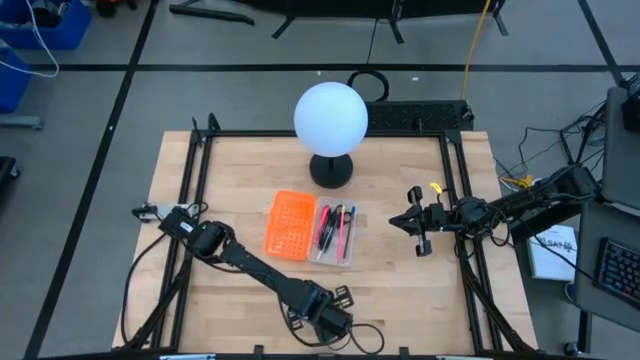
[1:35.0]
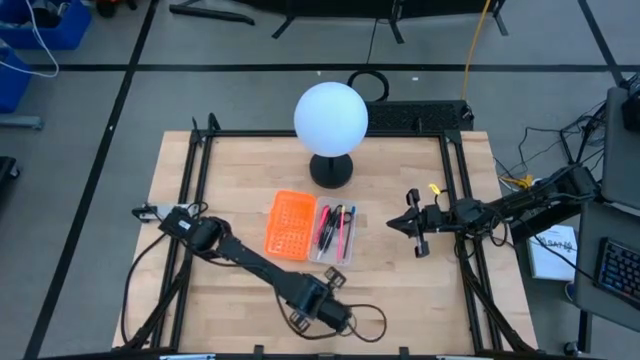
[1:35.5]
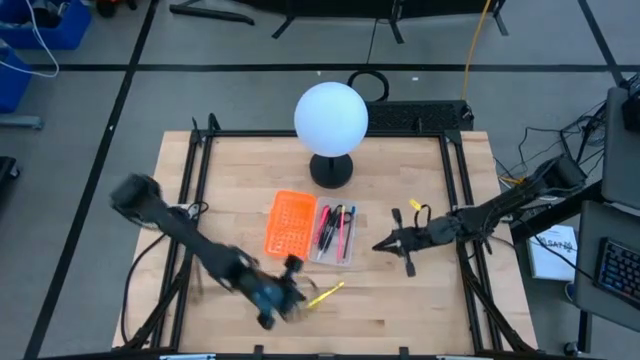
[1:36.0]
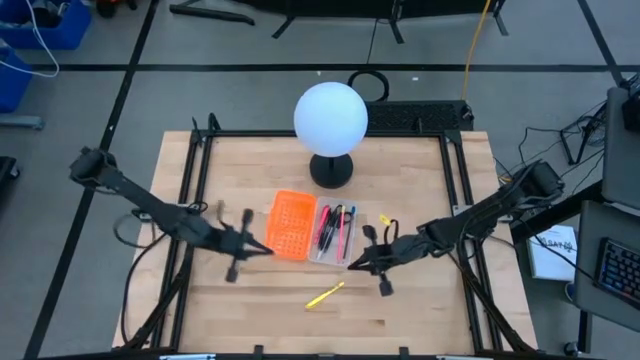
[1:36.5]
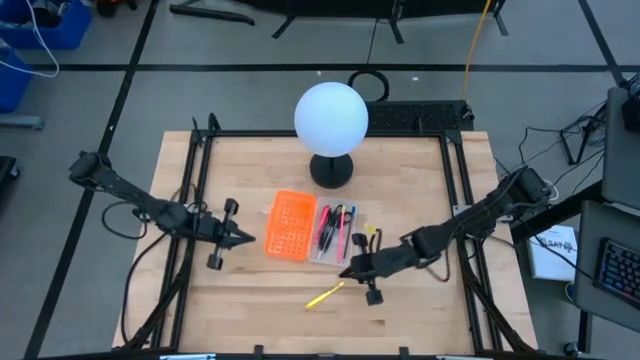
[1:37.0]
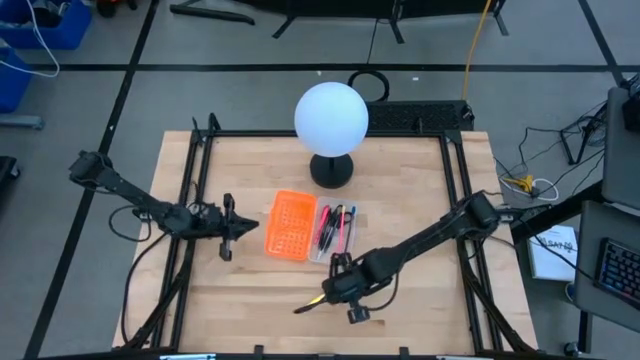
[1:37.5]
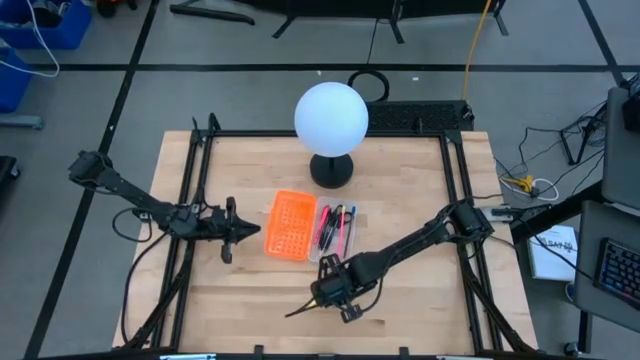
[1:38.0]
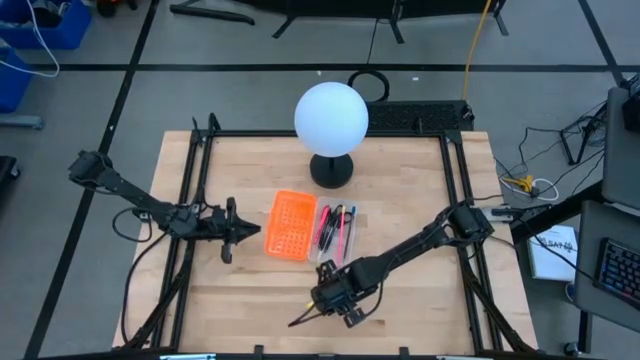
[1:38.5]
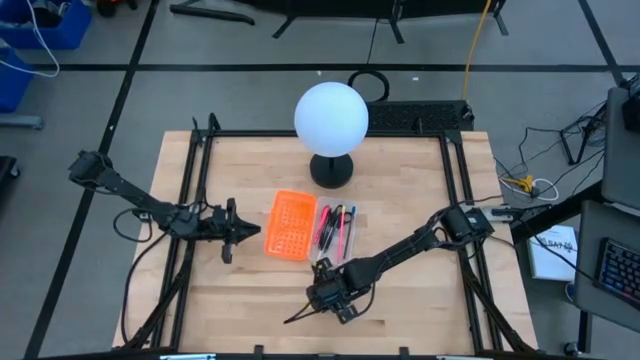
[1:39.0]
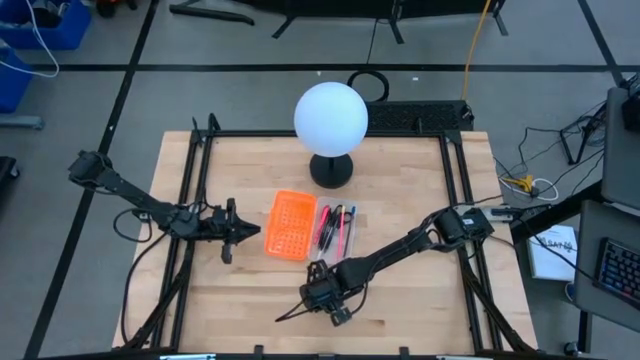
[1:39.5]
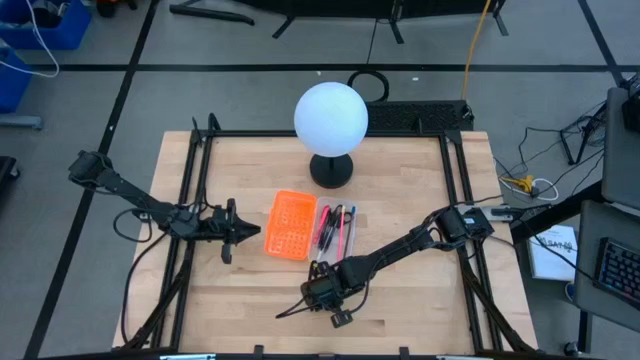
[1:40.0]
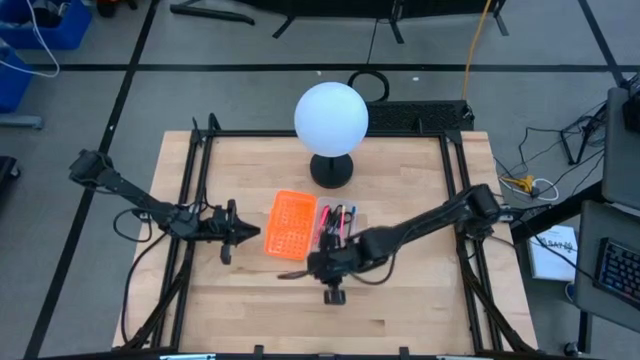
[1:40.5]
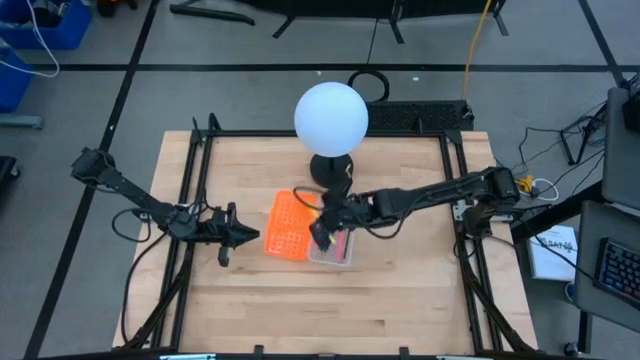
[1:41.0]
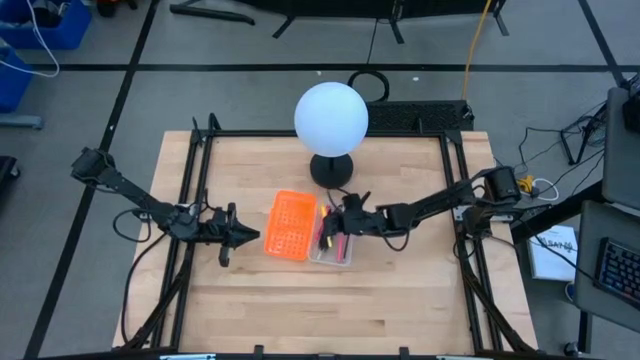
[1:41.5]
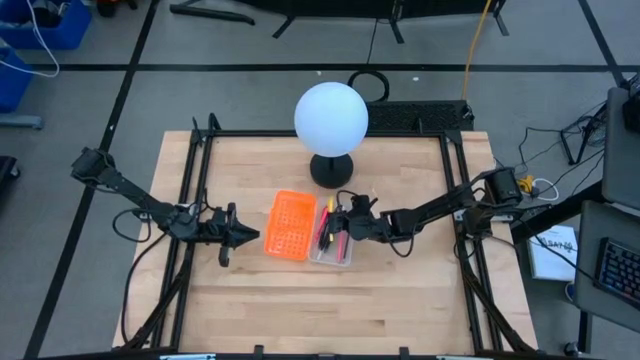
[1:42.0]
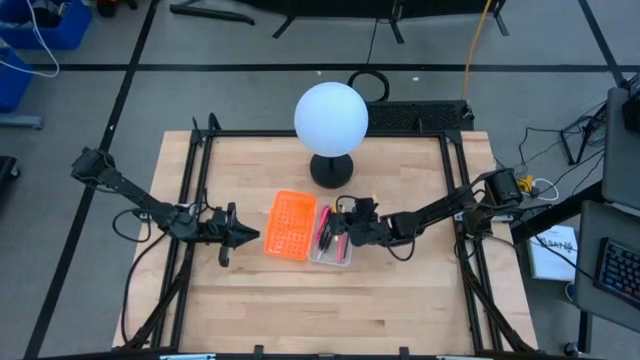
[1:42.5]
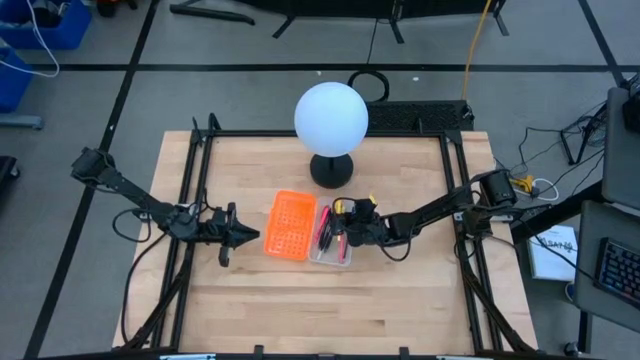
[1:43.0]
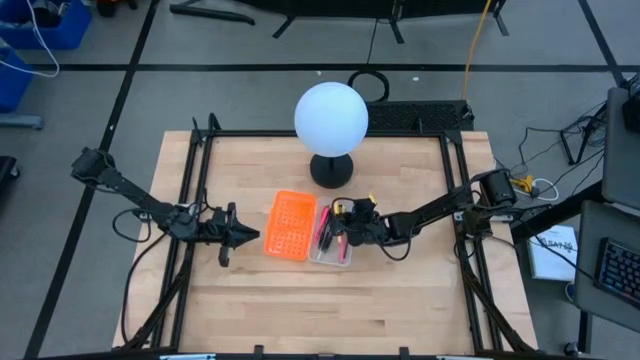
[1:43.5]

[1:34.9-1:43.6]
Task: Pick & place school supplies into a supply box
Put the yellow pen into the supply box

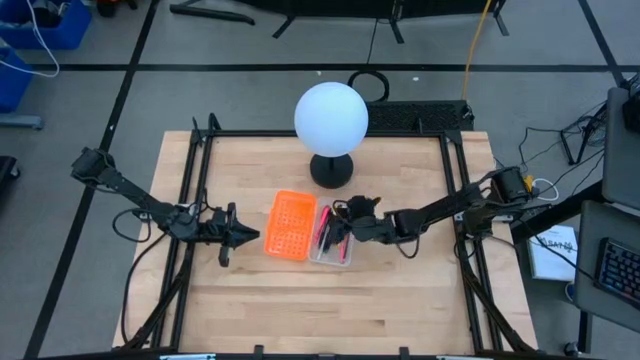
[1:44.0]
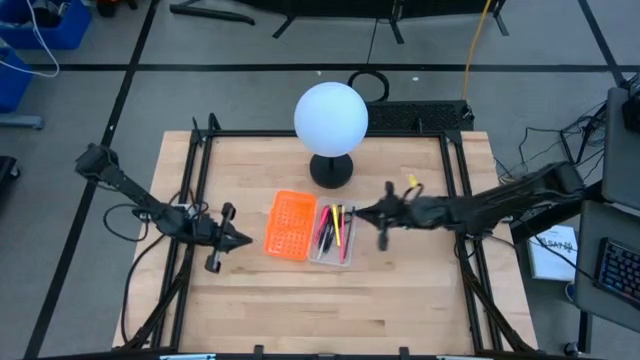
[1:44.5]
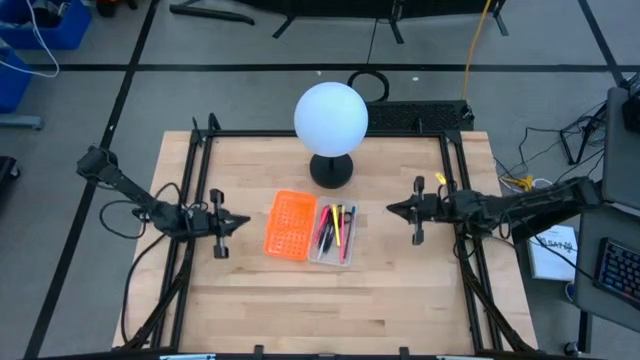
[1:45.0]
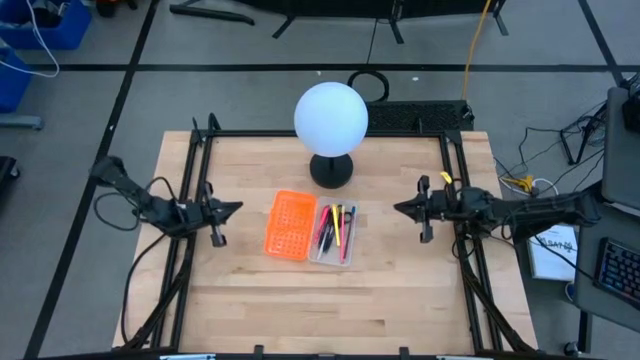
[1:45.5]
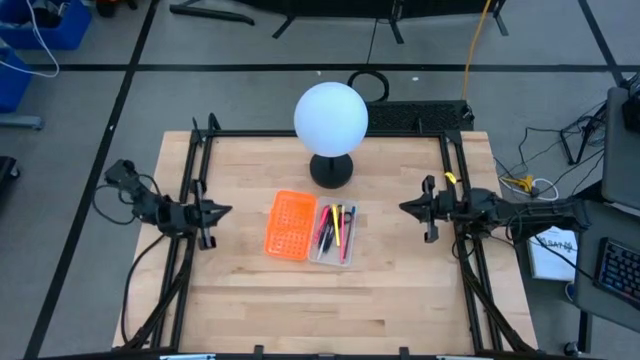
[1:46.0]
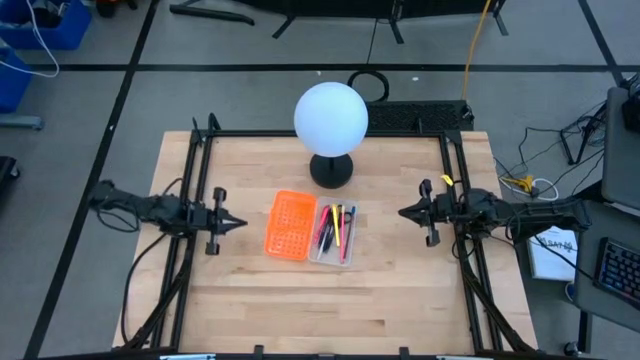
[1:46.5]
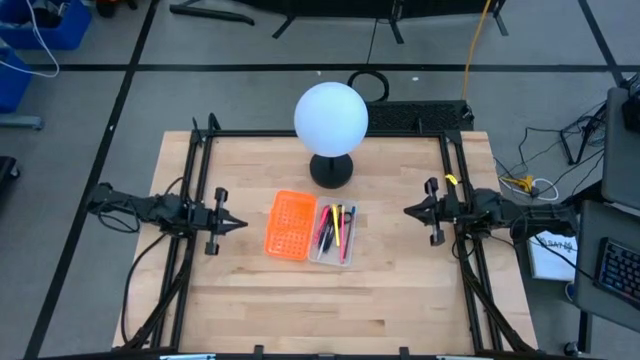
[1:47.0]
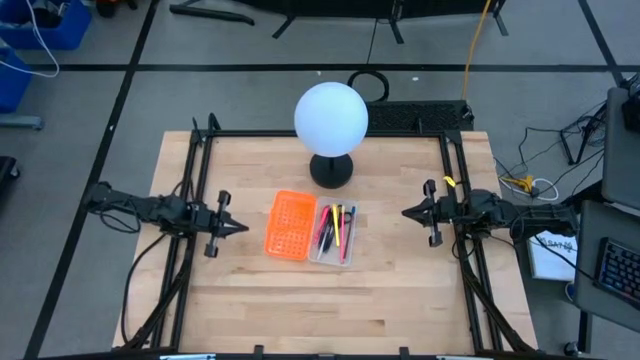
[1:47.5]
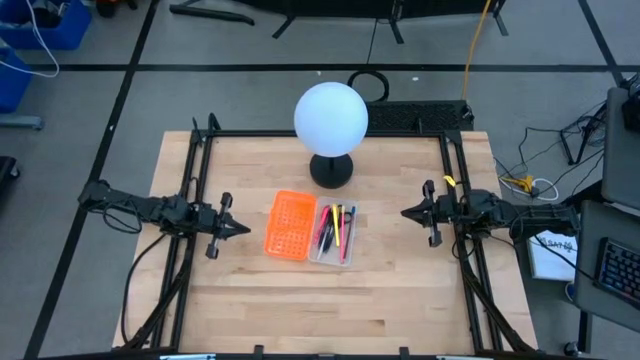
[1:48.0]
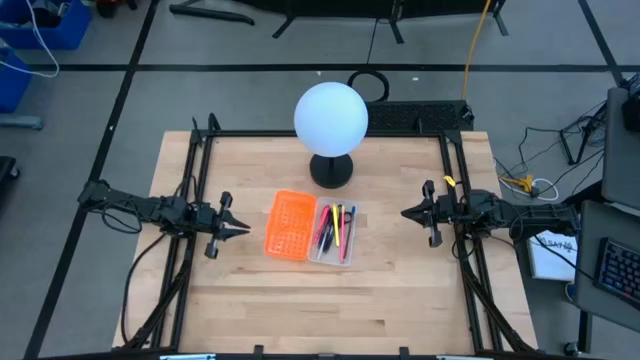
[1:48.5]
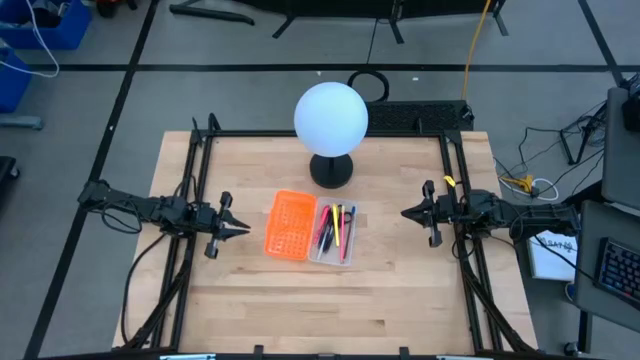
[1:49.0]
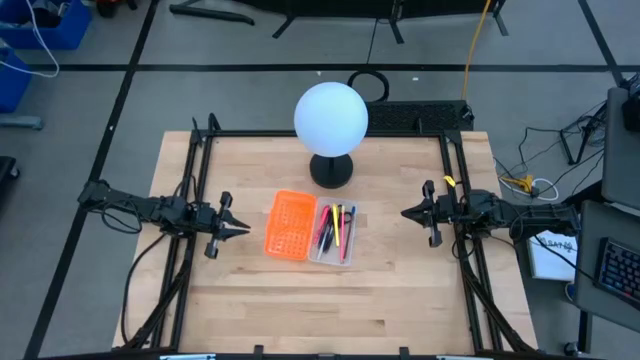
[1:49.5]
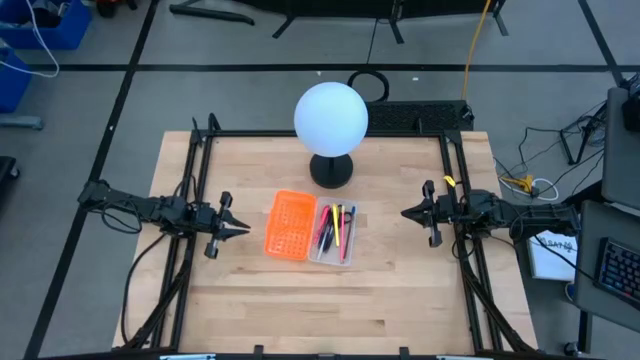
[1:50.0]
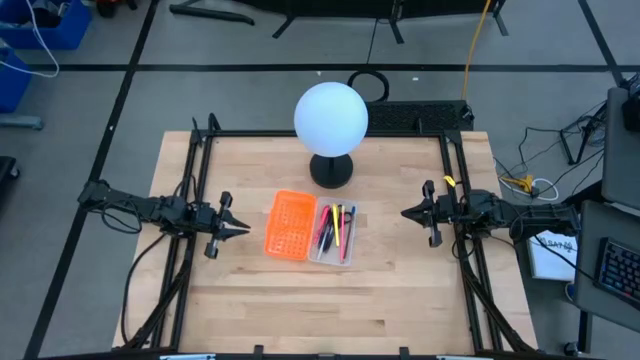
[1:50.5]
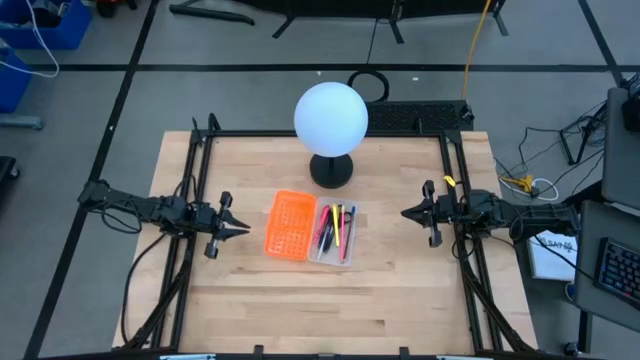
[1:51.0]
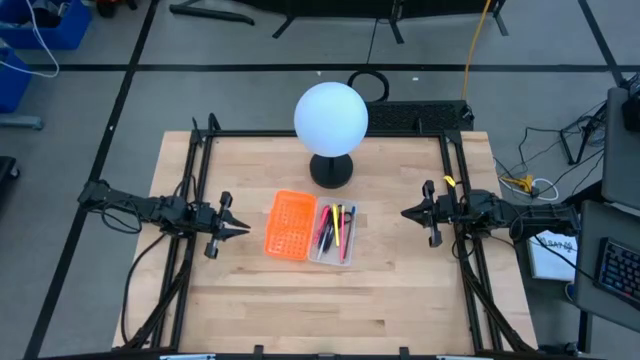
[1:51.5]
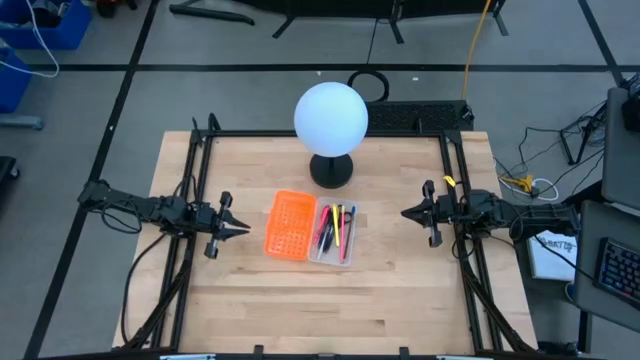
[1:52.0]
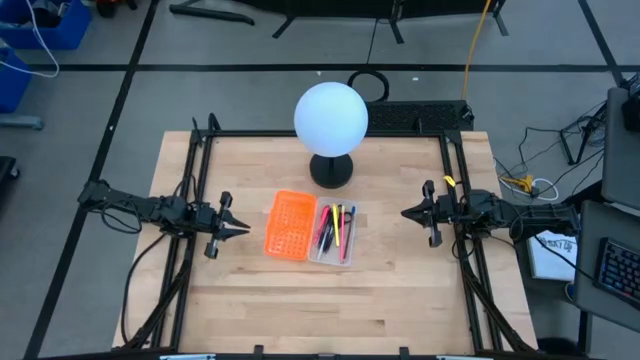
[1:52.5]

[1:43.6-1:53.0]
Return to Home Position

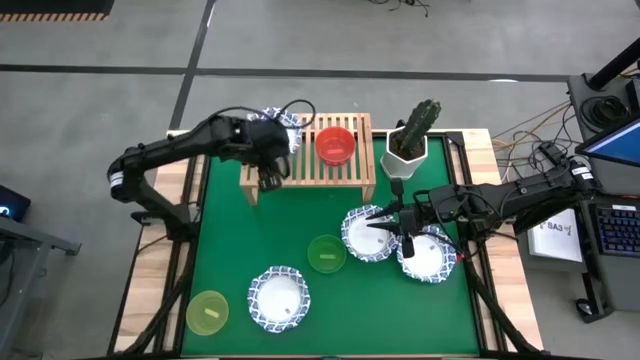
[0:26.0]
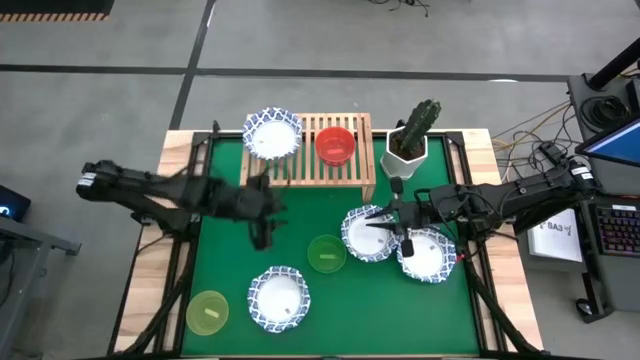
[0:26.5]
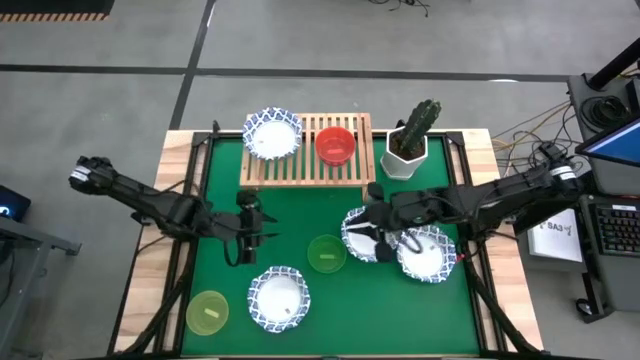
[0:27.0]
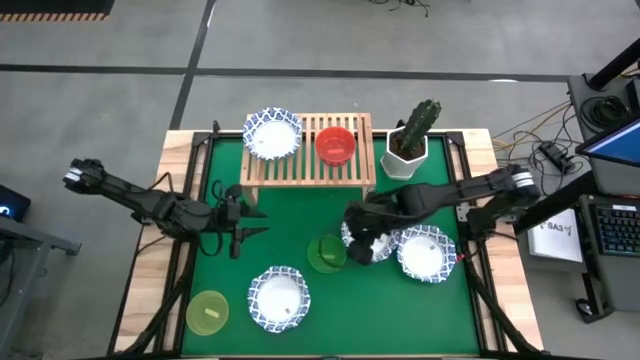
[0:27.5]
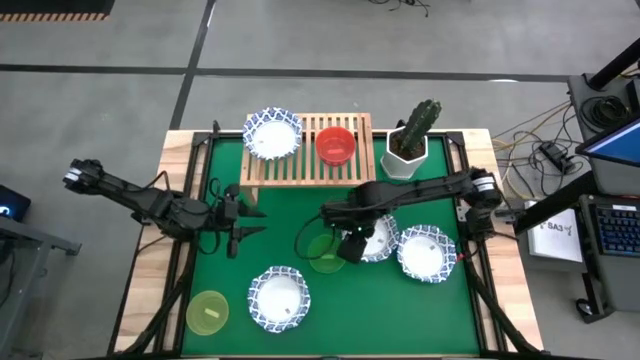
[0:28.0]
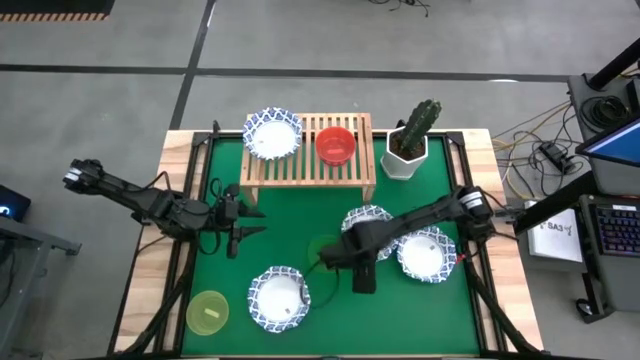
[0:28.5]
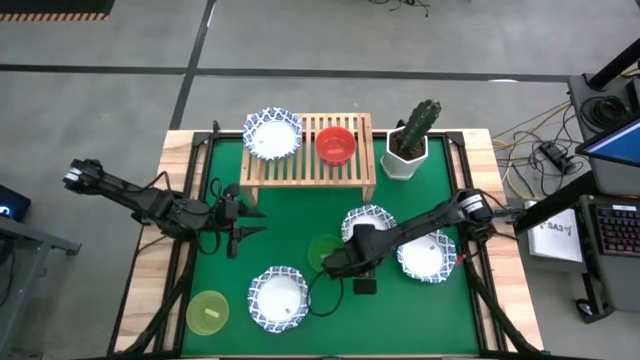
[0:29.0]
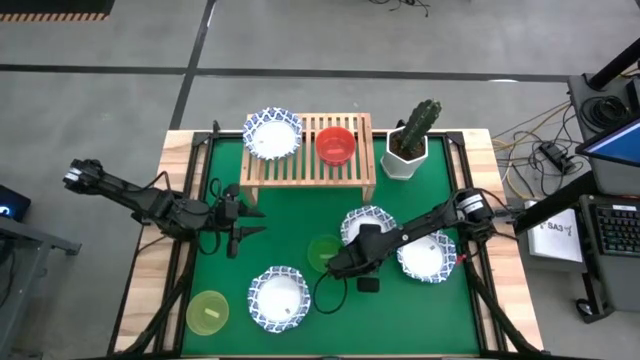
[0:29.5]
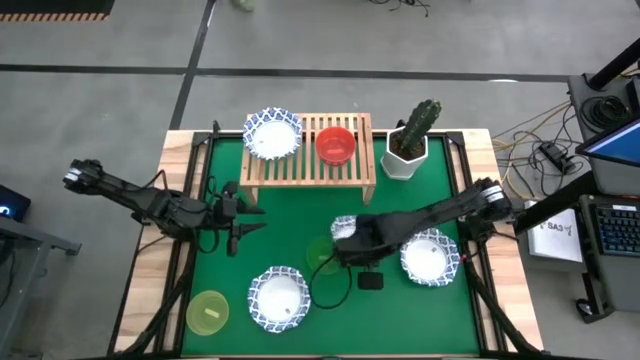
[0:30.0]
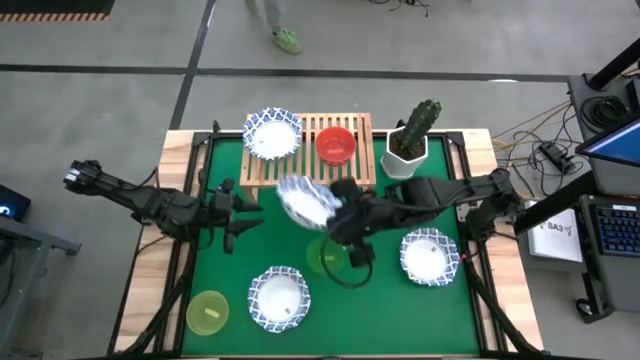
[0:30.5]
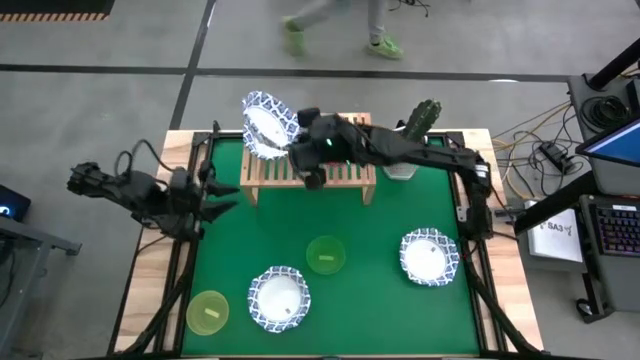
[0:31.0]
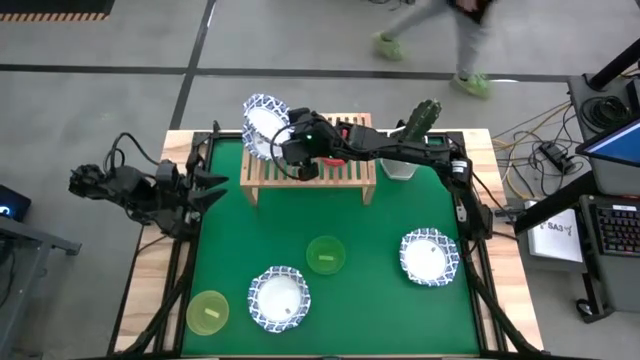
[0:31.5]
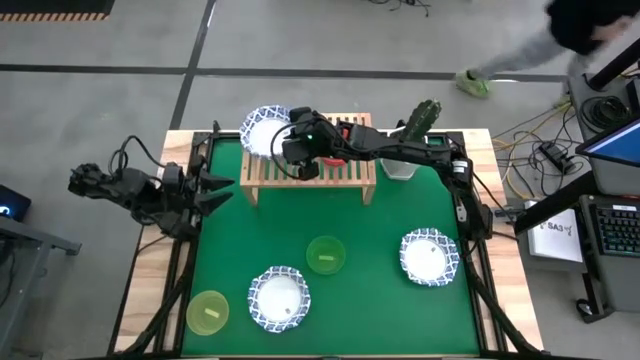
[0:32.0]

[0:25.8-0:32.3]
Task: Place and stack bowls onto a shelf
Stack the middle white and blue bowl on top of the white and blue bowl on the shelf
